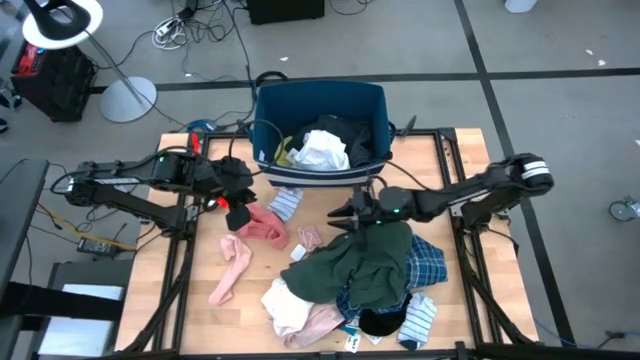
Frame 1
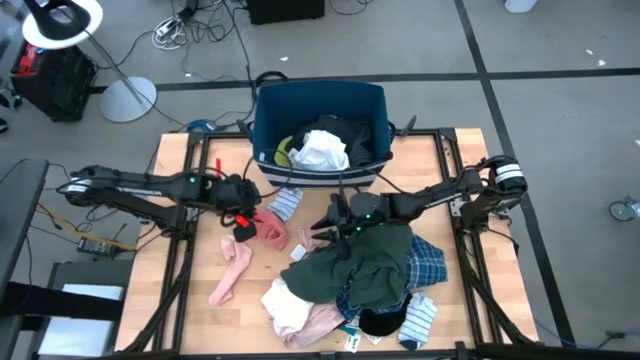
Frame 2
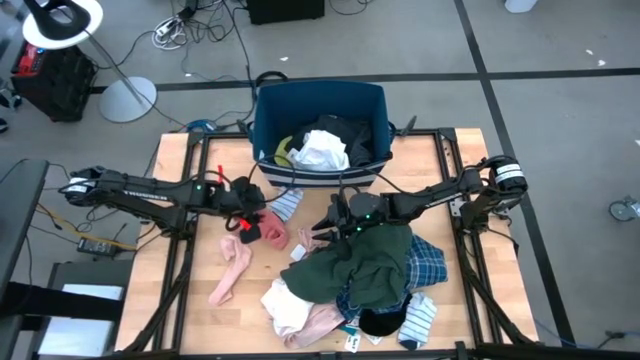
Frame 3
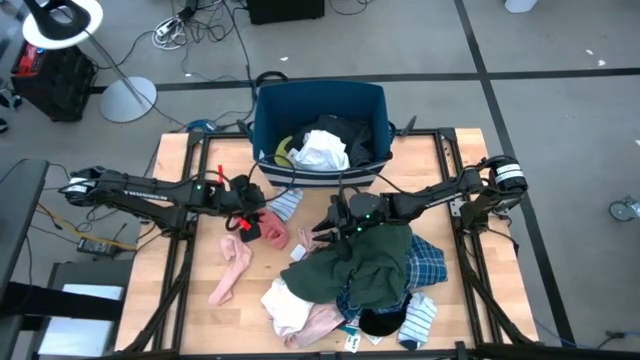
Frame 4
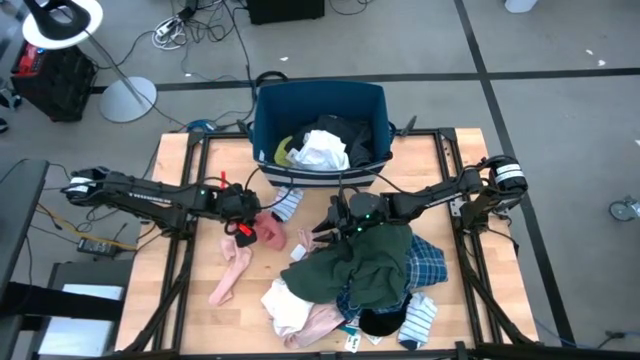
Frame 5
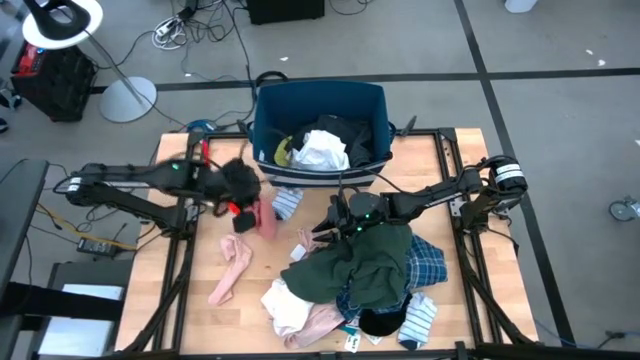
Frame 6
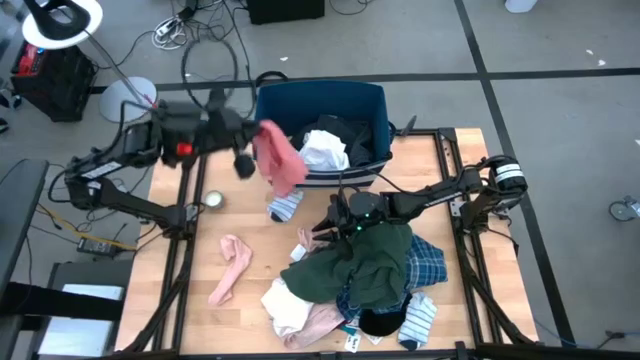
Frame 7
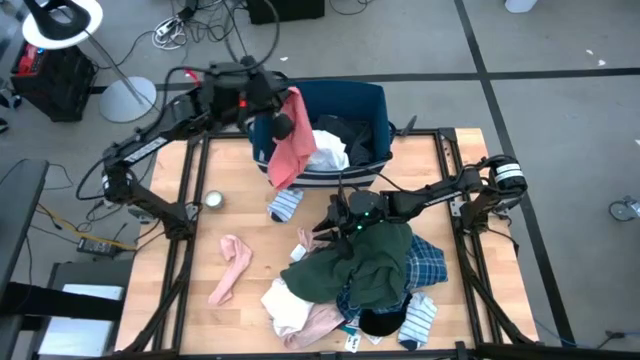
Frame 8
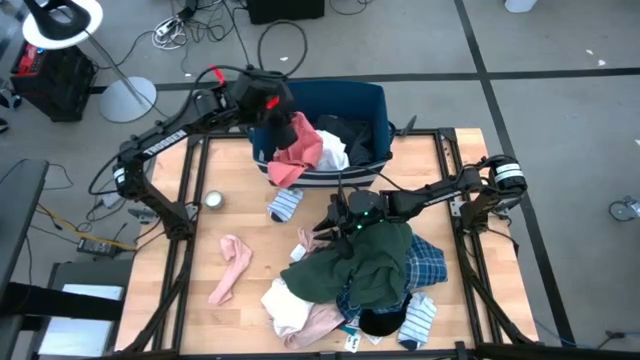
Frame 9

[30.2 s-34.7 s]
Task: Sort clothes
Put the dark pink boxer into the laundry organizer

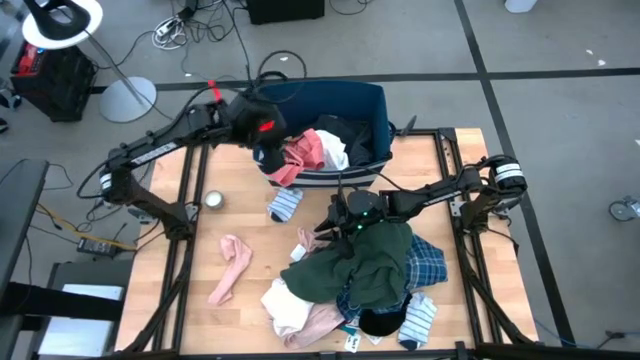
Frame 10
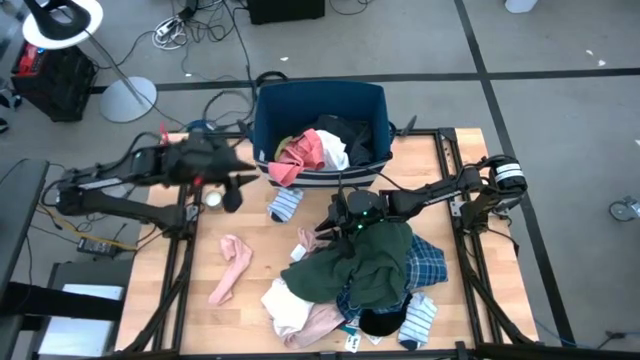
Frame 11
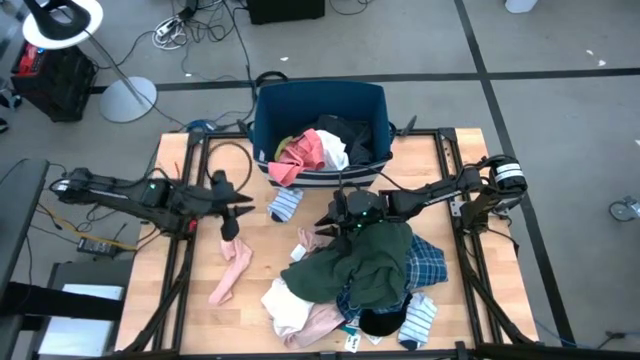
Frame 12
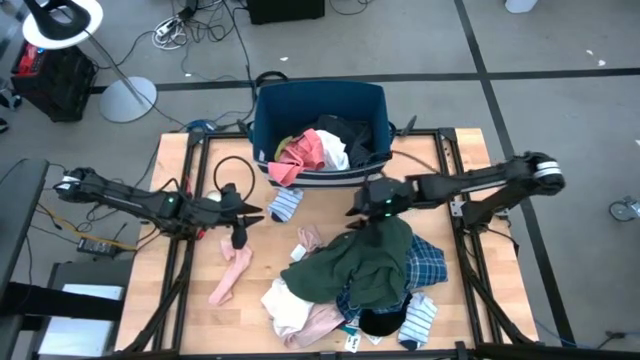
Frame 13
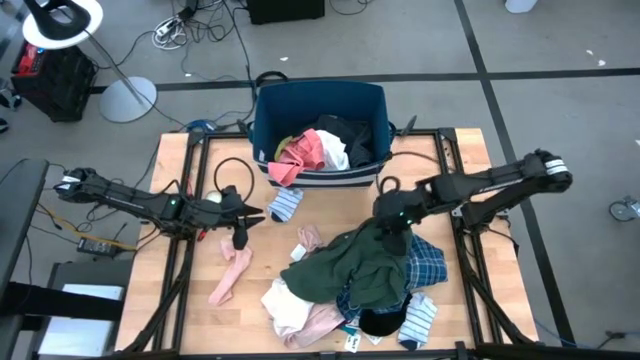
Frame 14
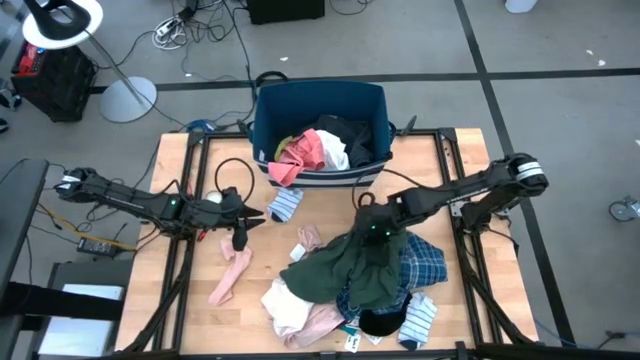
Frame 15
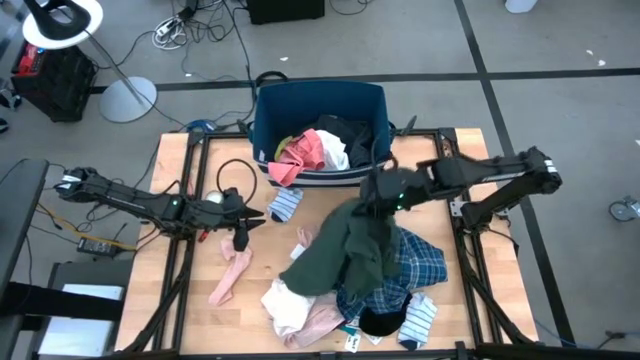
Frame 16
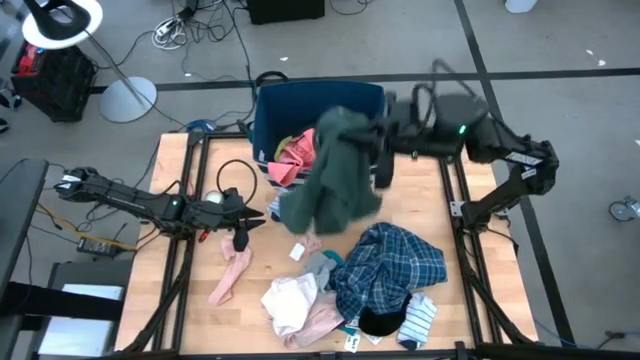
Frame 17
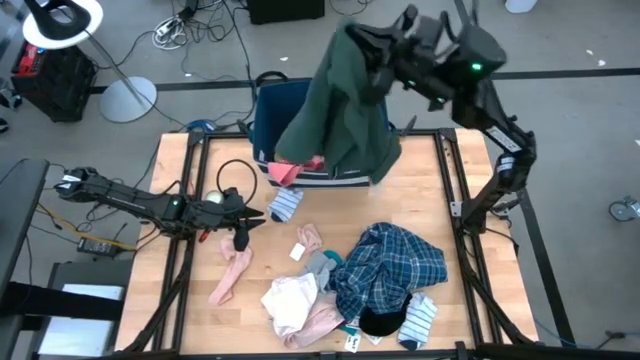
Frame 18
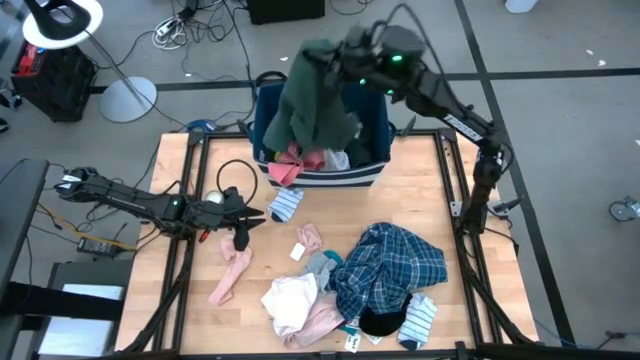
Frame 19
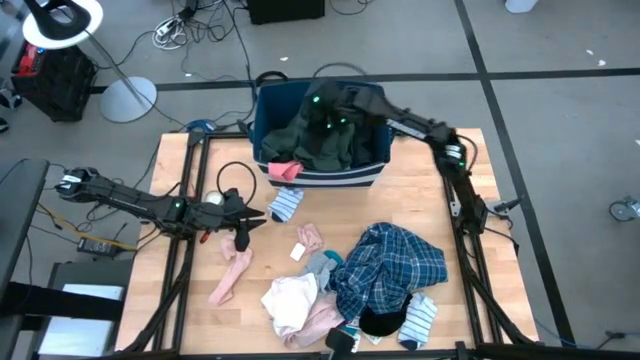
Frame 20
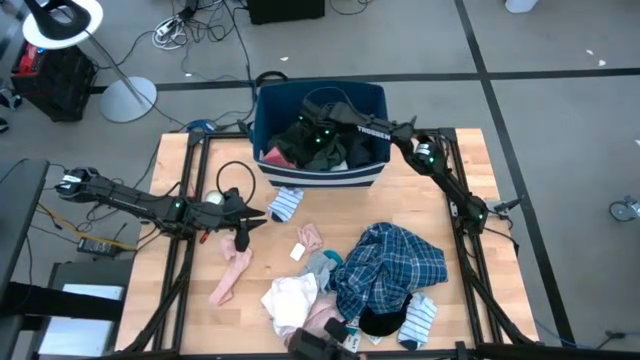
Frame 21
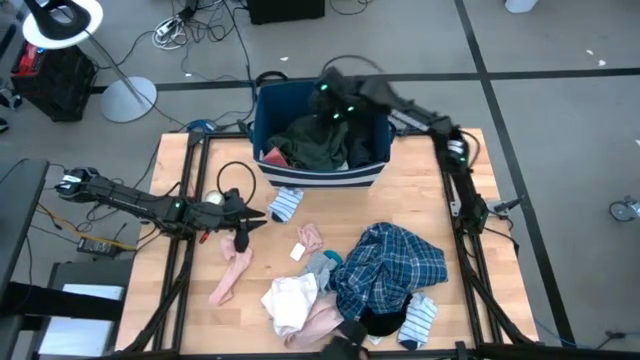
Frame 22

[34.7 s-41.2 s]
Put the green polo shirt into the blue laundry organizer

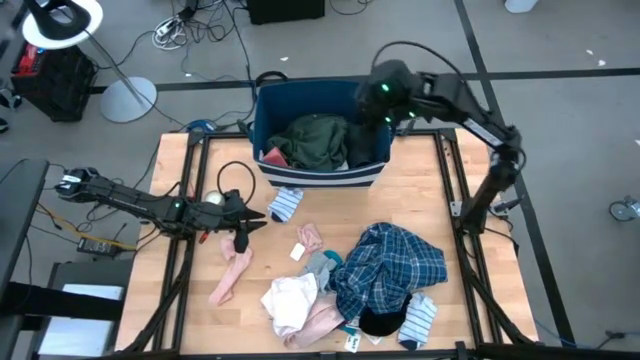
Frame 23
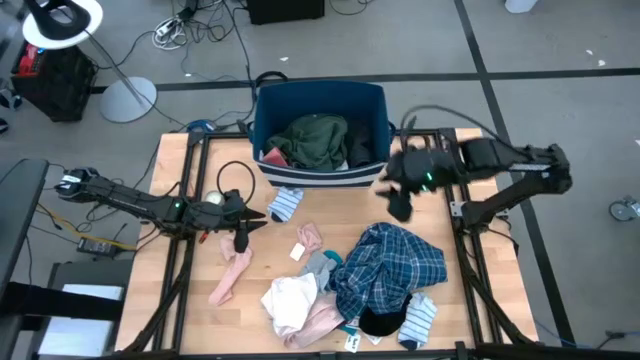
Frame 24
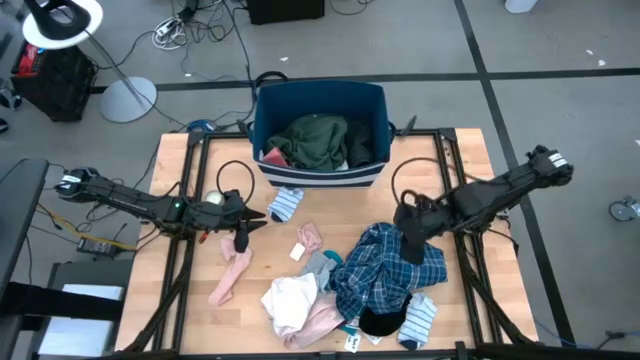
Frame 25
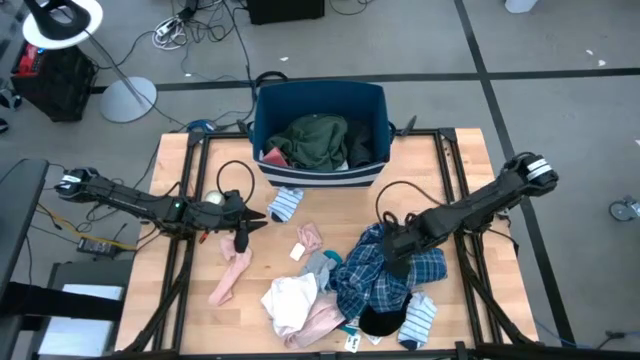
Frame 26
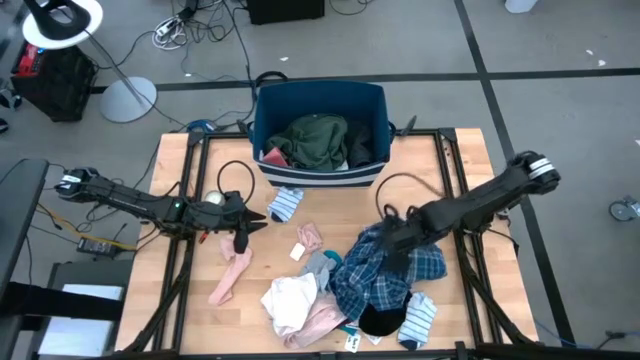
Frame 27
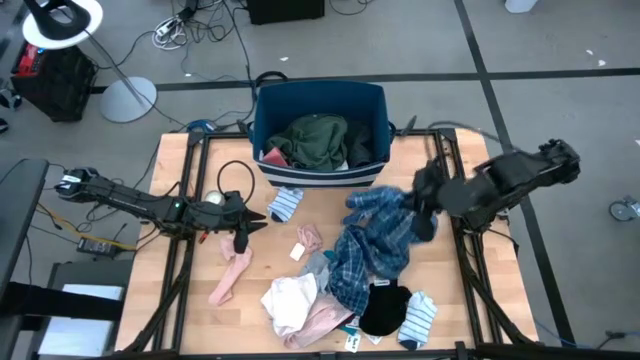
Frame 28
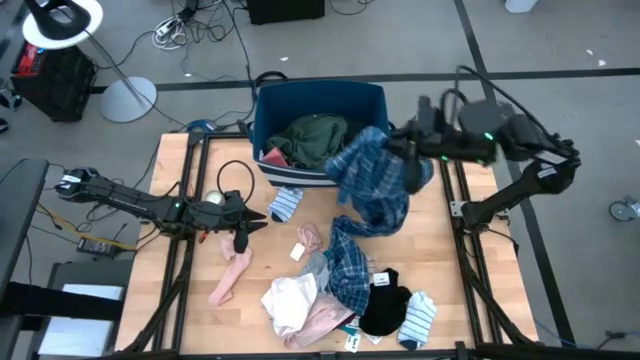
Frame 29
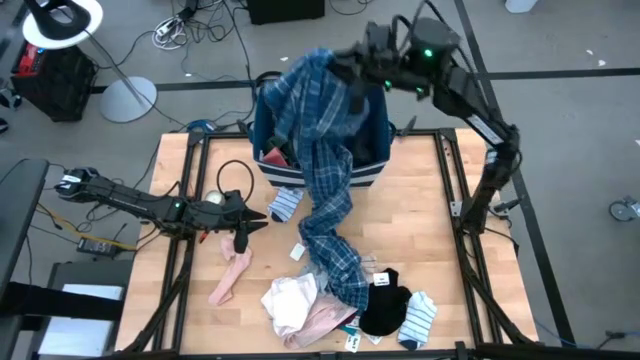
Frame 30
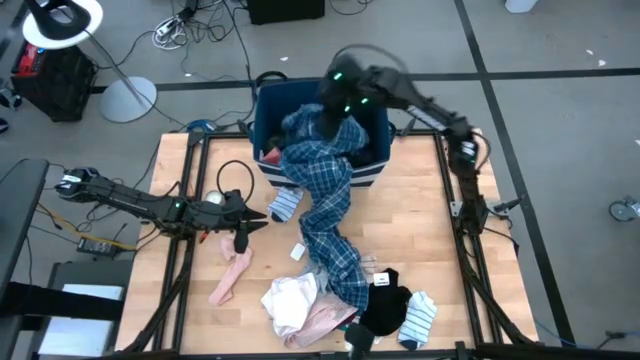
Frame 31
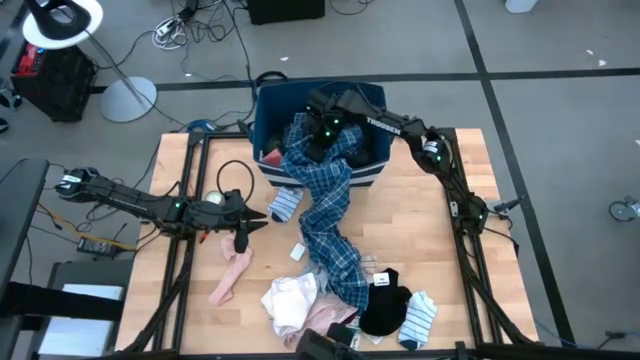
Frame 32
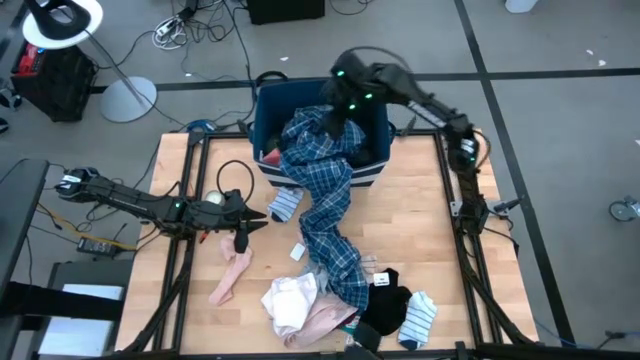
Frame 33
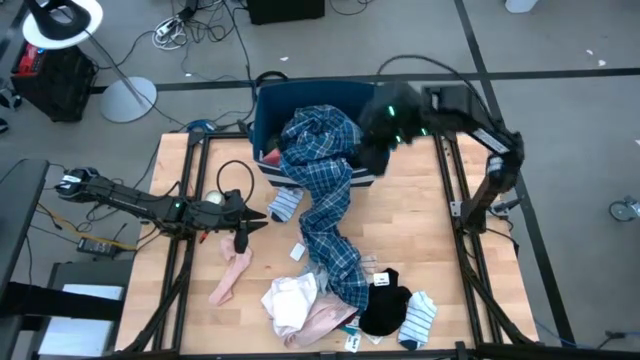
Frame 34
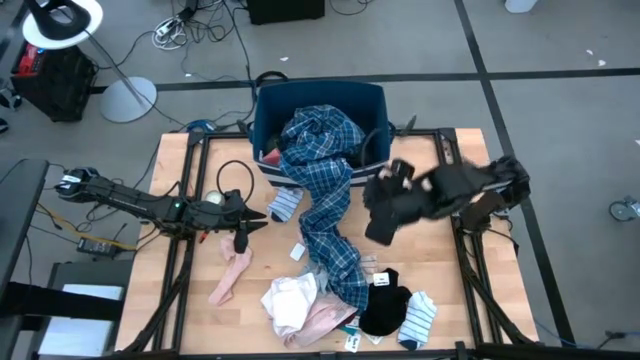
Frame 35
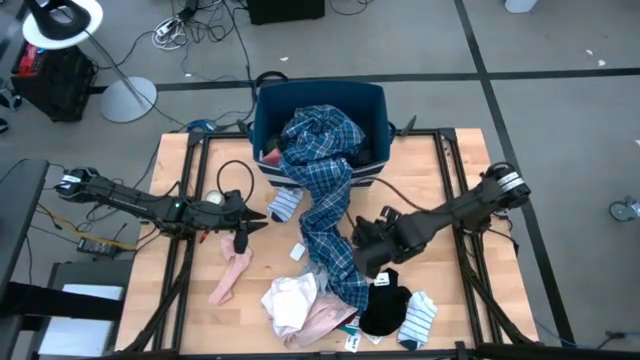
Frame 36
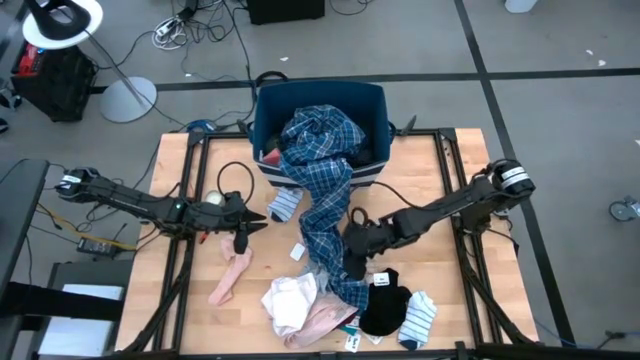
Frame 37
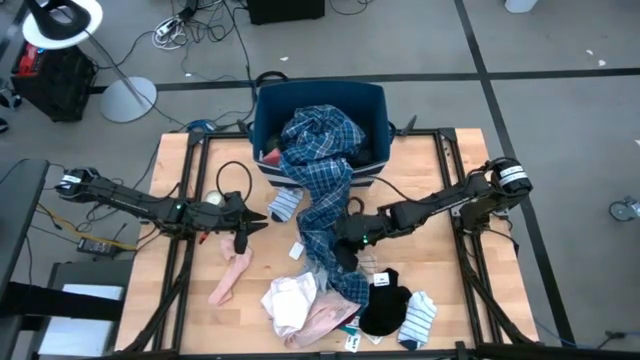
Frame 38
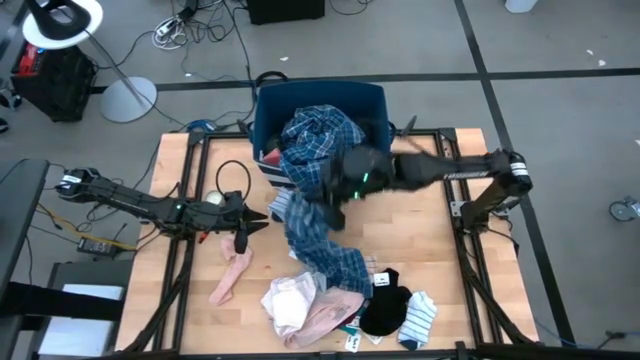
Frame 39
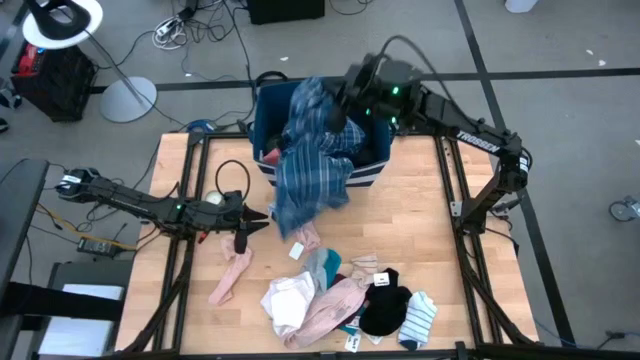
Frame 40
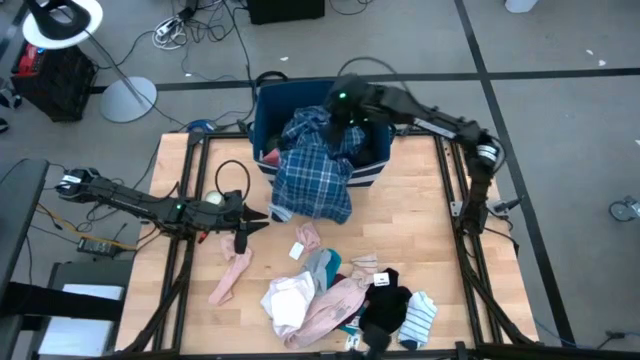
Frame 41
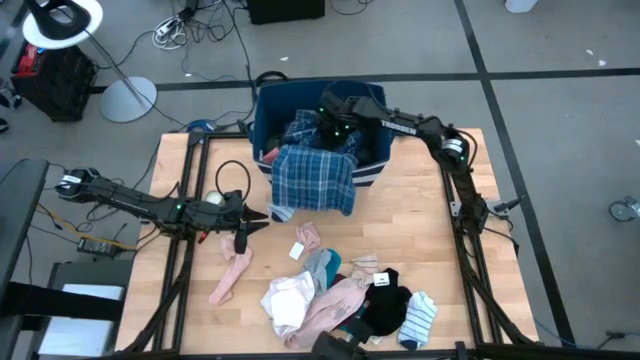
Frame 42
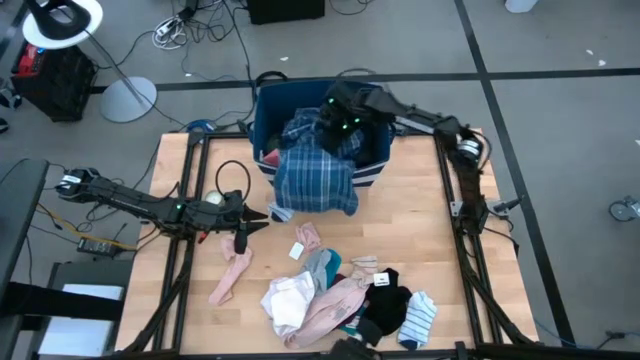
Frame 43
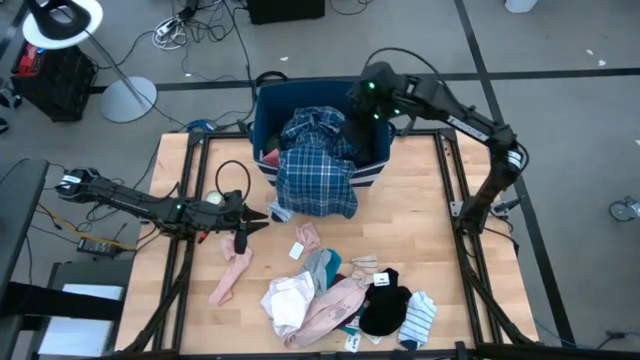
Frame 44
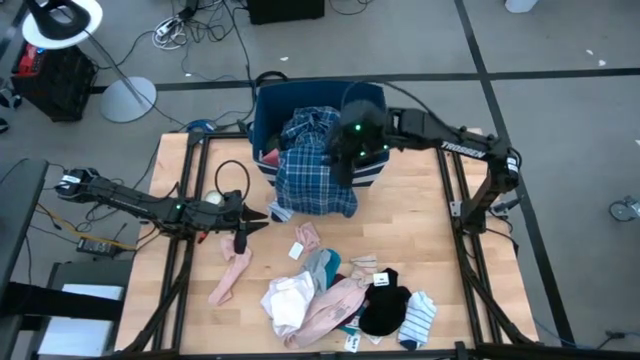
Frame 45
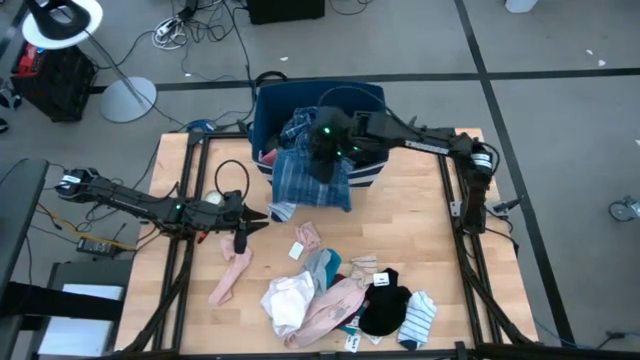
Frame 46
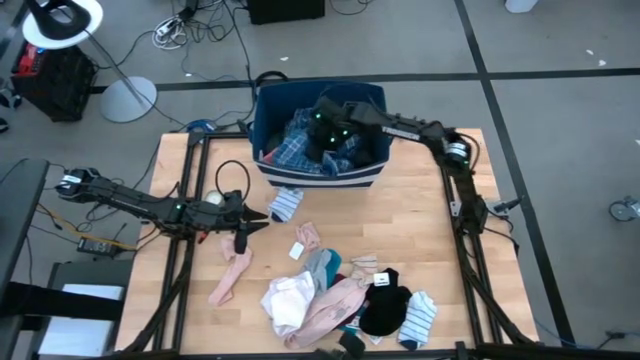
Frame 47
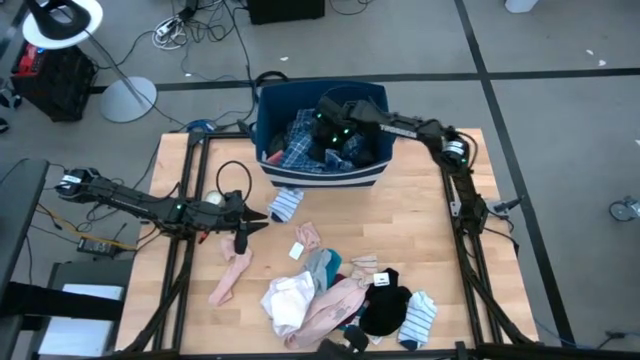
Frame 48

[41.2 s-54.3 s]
Put the blue long sleeve polo into the blue laundry organizer
